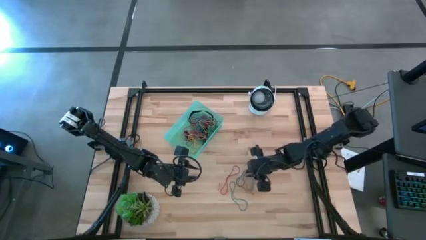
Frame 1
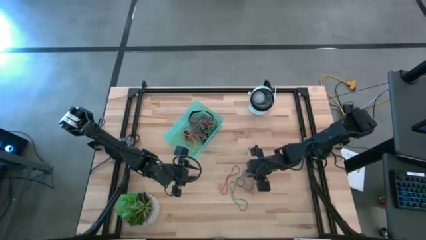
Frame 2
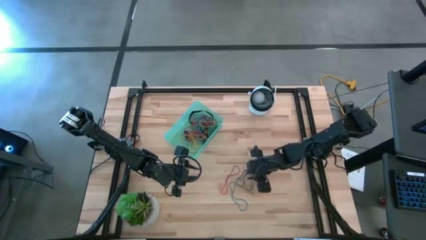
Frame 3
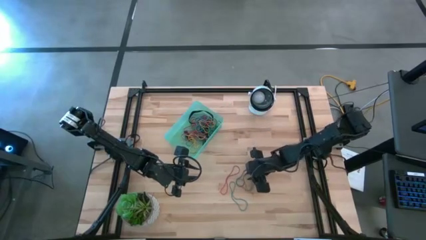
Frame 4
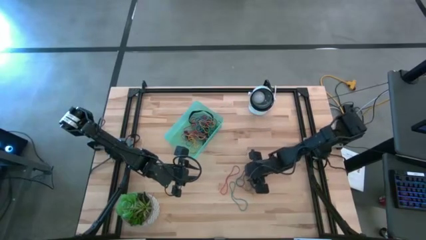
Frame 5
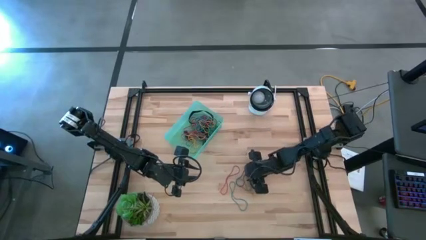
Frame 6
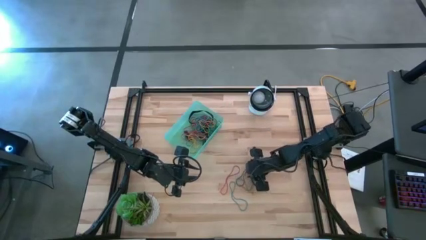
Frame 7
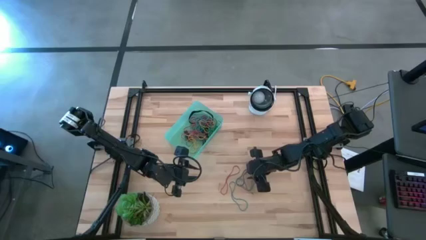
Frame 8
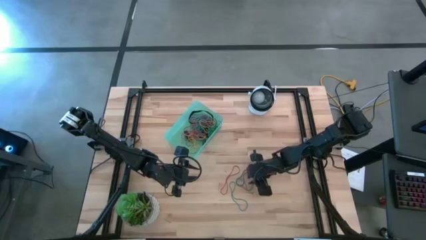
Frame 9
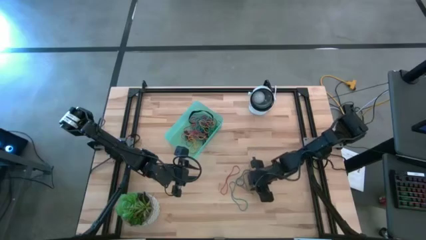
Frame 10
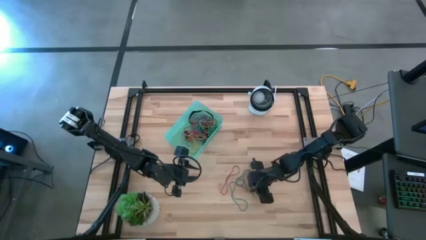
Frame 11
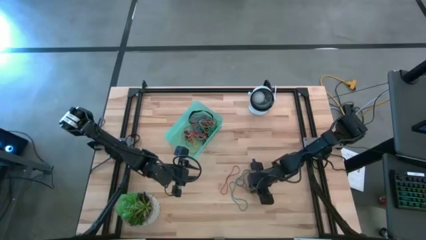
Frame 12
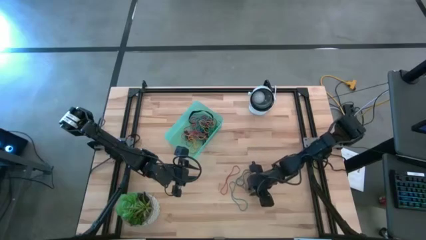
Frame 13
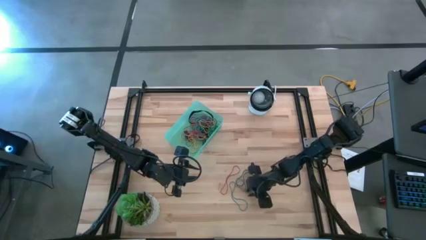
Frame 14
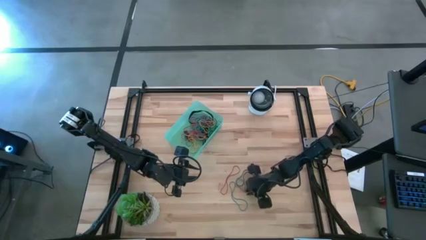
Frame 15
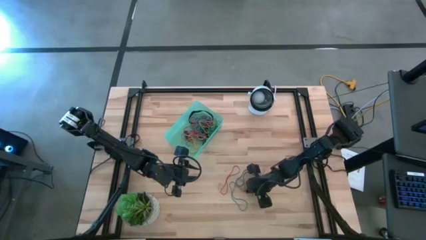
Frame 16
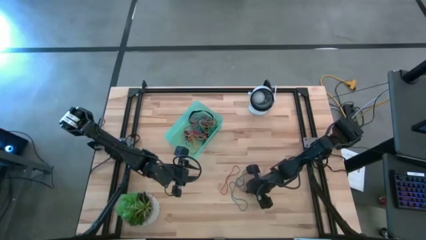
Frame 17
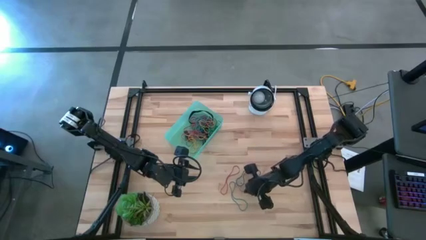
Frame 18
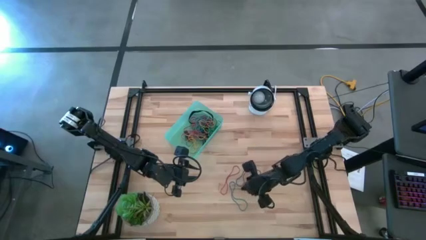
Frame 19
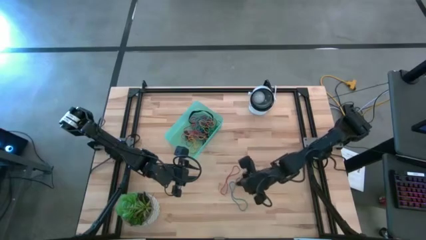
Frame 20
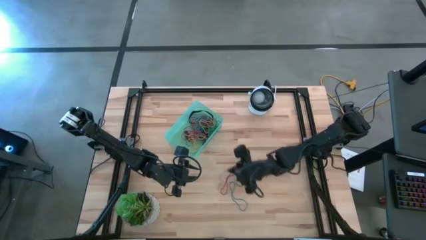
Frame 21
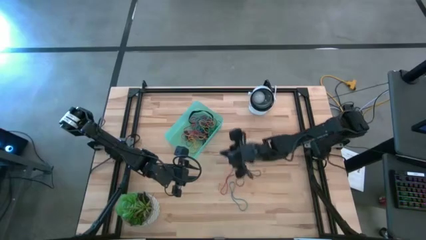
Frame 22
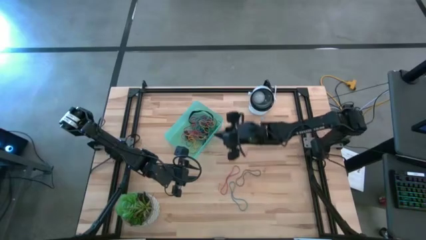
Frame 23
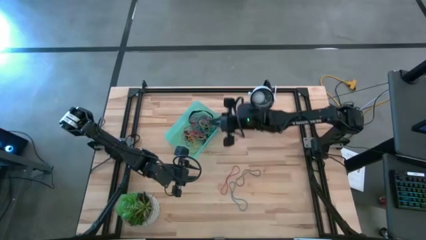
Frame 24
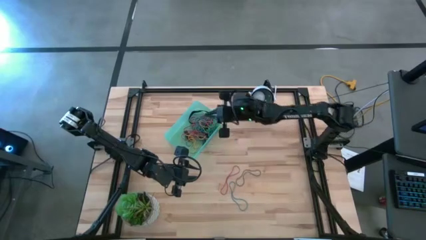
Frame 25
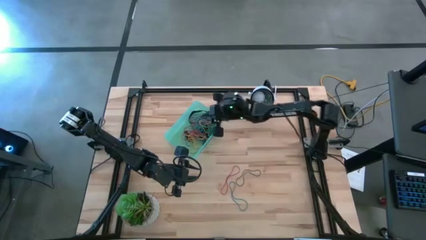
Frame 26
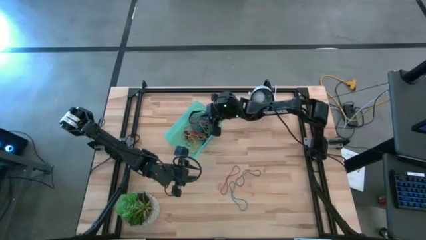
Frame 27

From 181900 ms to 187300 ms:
Task: Pick and place rubber bands into bin
Put the blue rubber band into the green bin

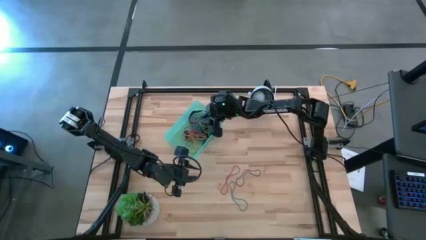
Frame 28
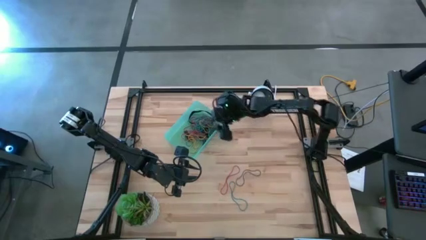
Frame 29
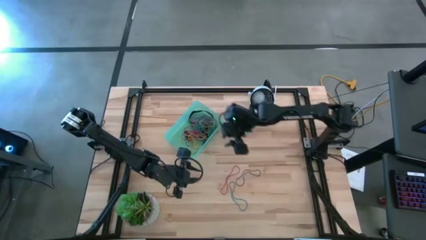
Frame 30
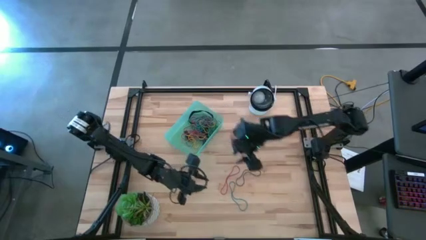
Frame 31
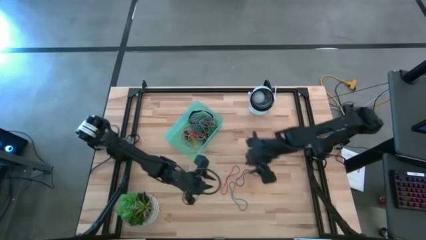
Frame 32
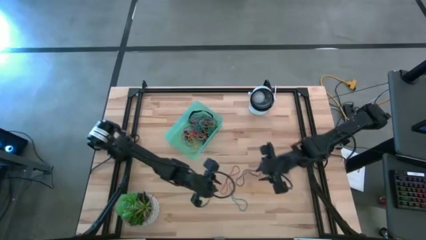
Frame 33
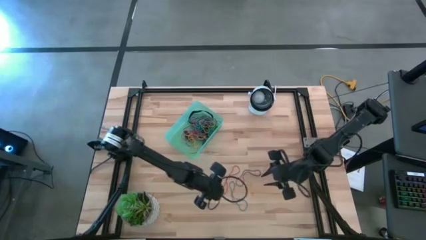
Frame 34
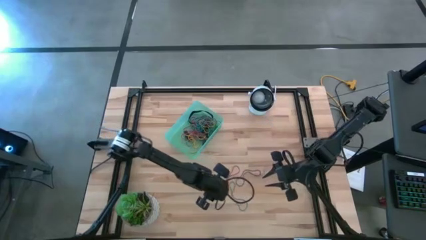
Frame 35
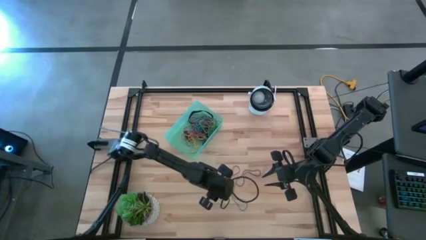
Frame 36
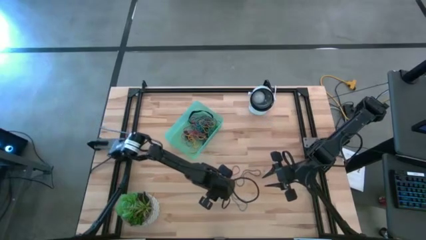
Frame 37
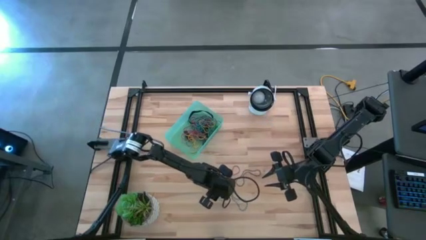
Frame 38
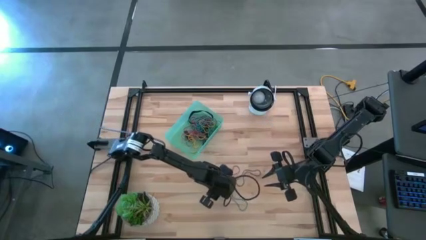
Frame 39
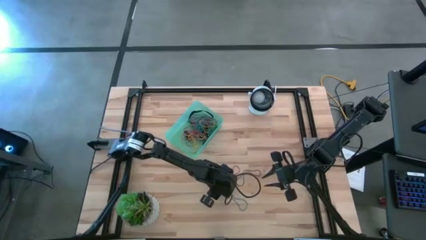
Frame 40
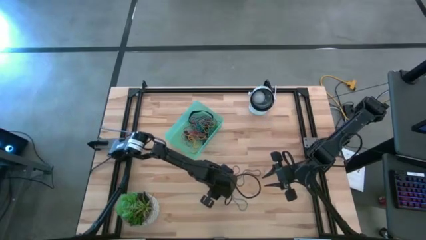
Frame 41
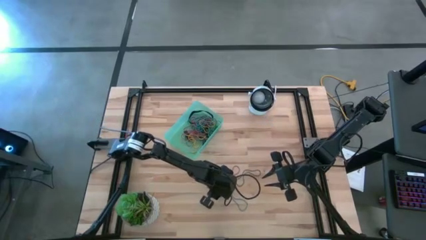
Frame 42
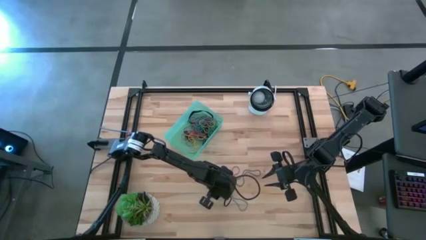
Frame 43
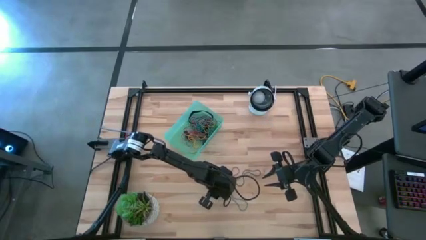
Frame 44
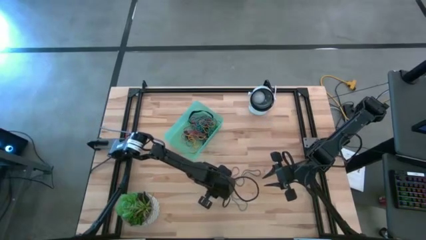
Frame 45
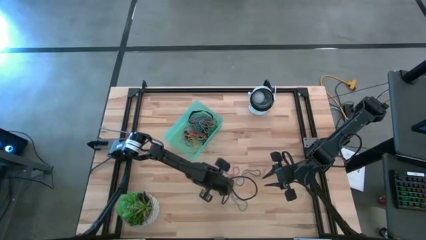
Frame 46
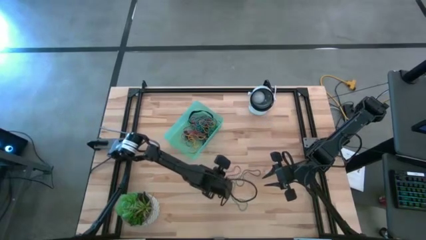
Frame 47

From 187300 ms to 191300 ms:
Put the red rubber band into the green bin

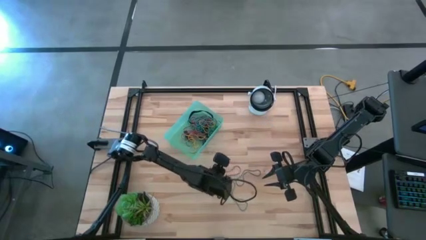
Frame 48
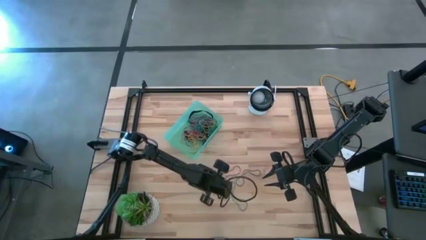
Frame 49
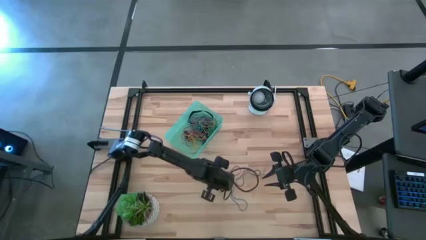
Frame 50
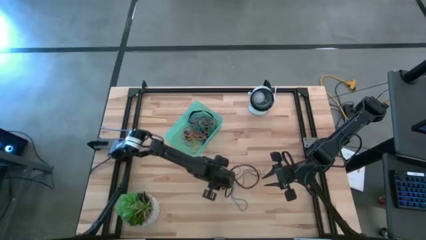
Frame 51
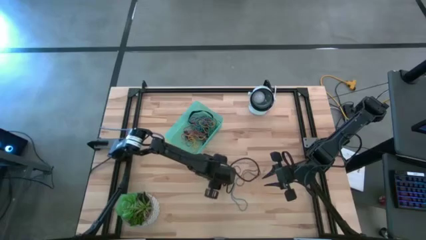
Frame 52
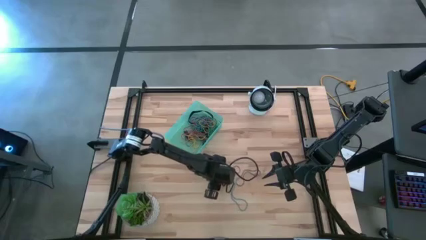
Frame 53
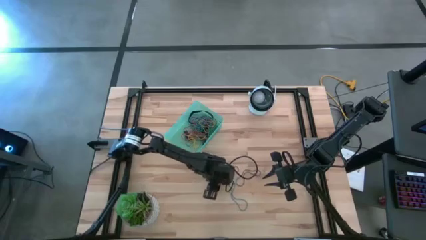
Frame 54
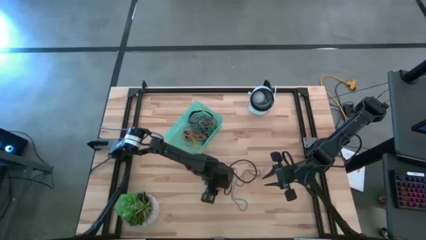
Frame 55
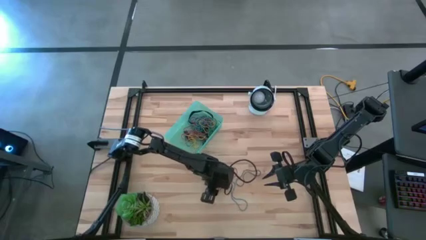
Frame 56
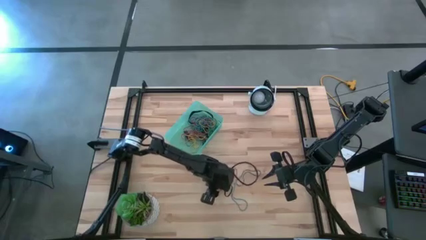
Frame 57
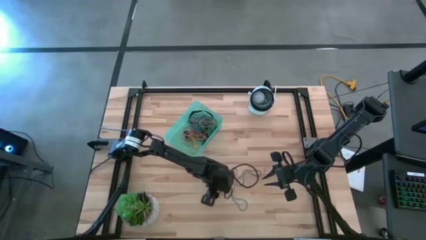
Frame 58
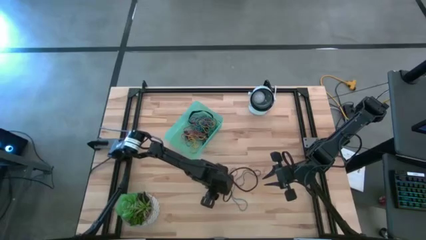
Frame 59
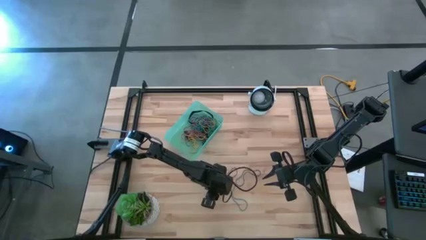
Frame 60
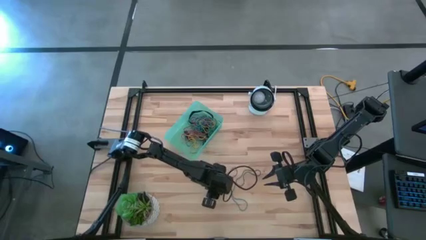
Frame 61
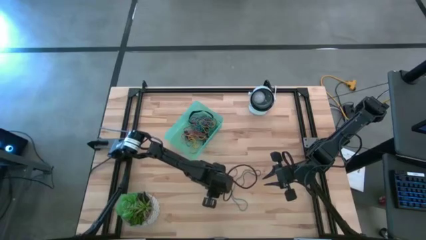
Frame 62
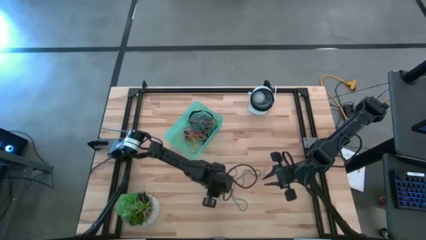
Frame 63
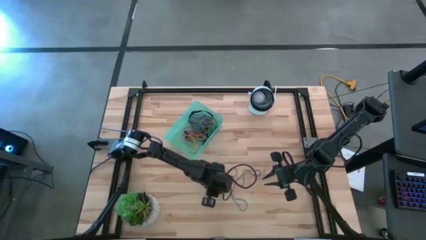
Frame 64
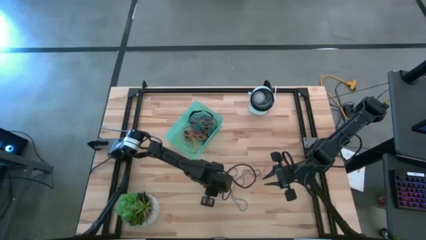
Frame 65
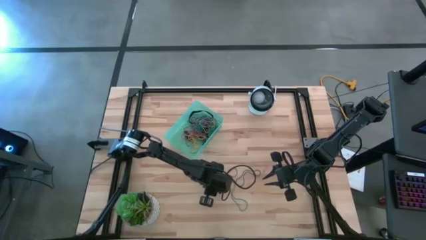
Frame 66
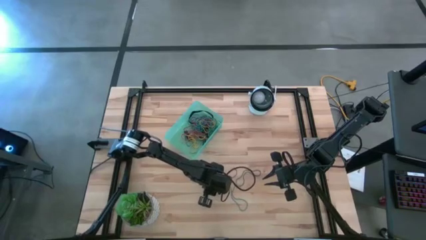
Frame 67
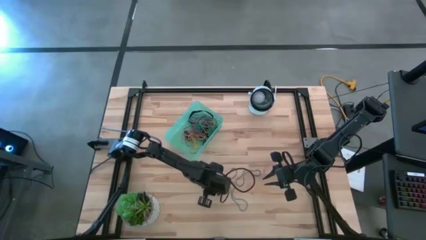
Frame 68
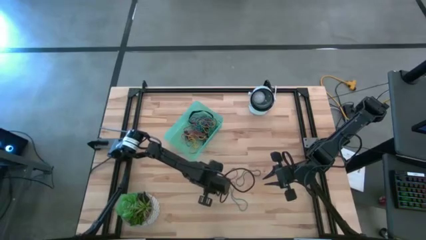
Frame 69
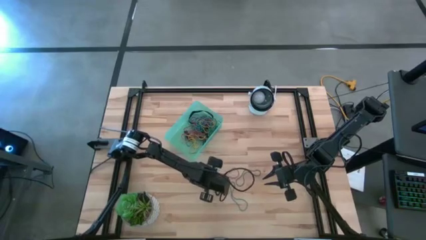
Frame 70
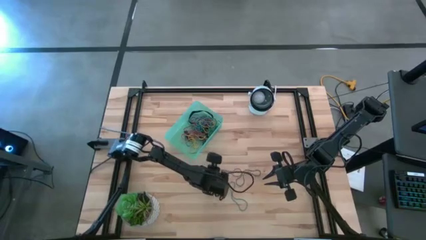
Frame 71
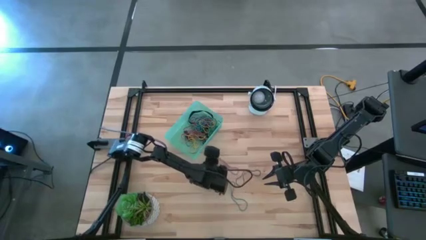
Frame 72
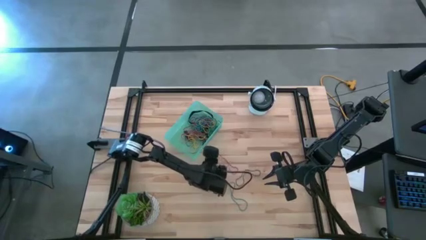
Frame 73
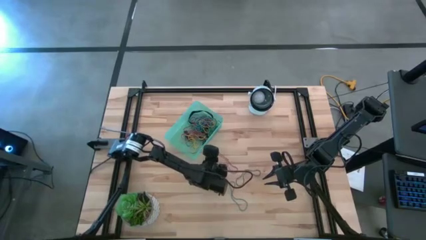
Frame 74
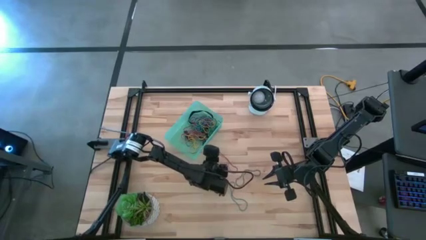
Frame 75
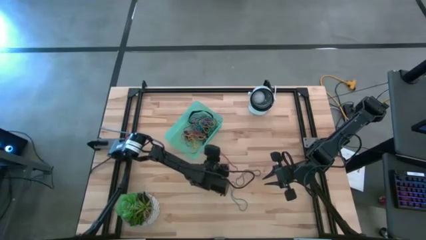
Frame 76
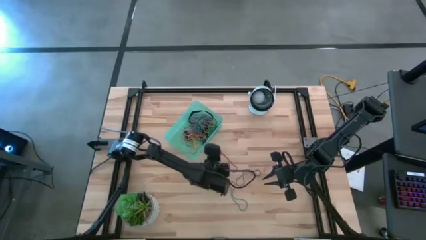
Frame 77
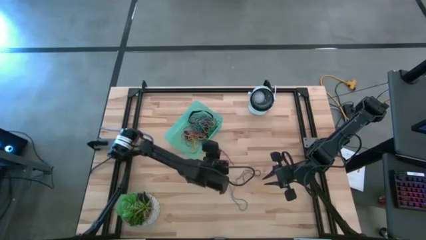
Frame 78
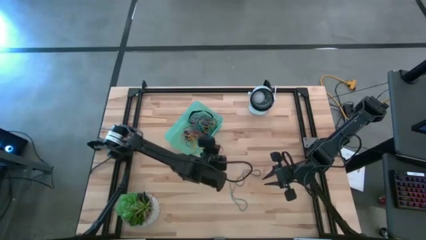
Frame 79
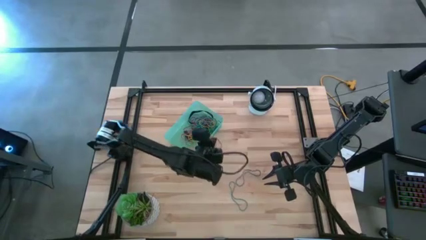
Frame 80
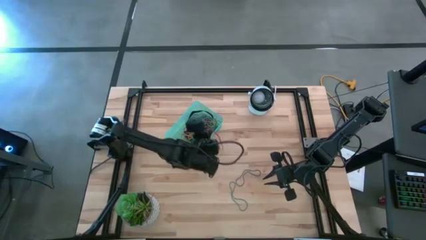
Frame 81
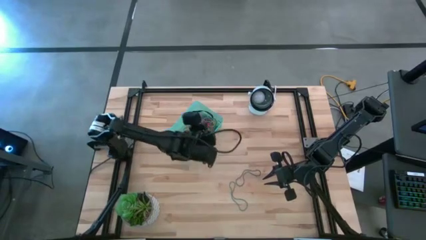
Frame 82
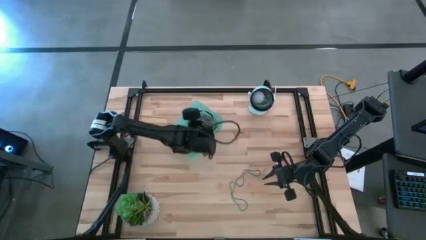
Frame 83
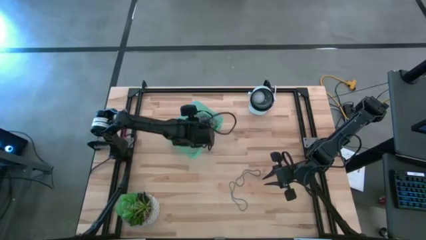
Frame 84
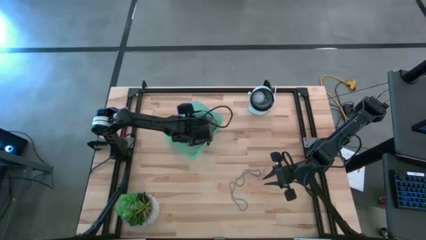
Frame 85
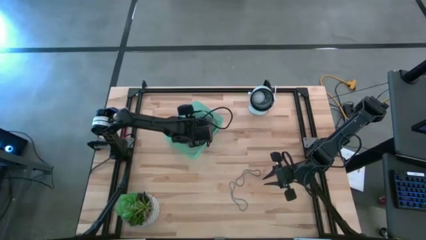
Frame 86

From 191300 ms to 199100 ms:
Put the red rubber band into the green bin
